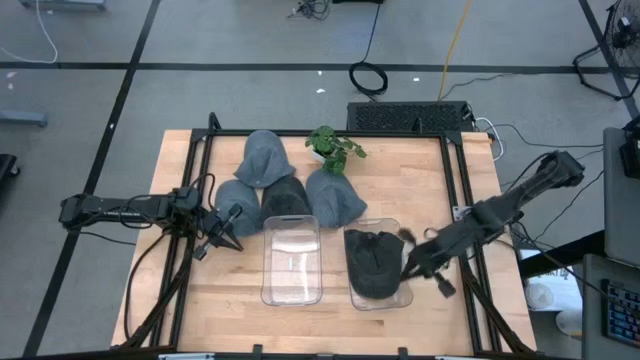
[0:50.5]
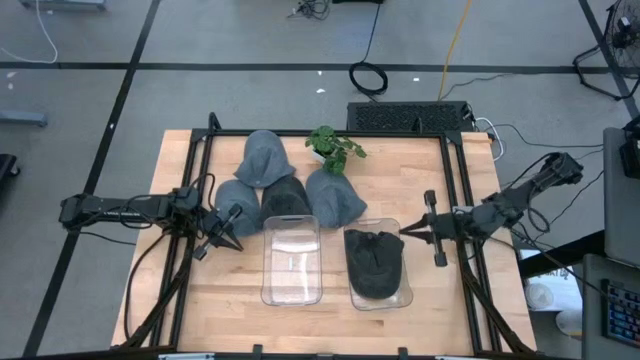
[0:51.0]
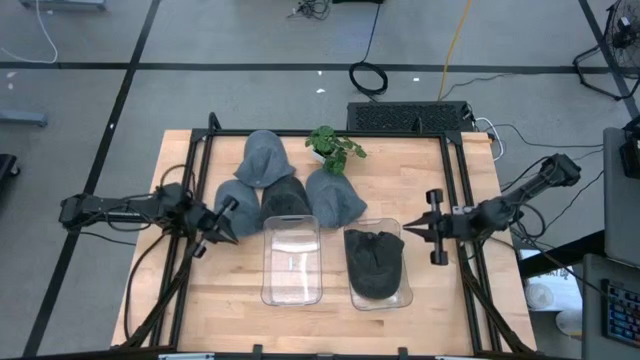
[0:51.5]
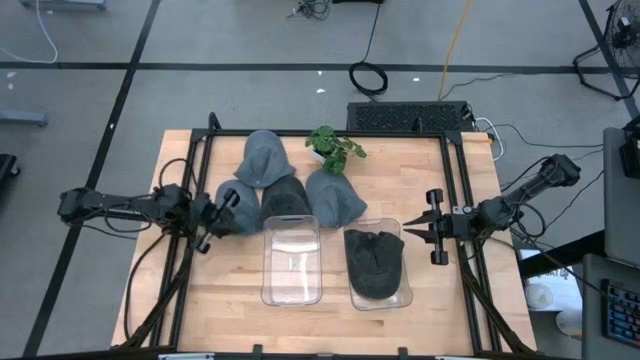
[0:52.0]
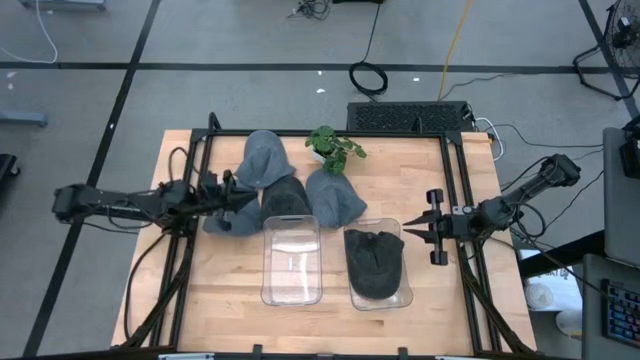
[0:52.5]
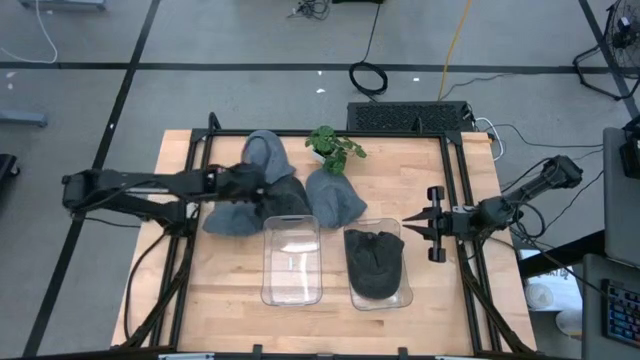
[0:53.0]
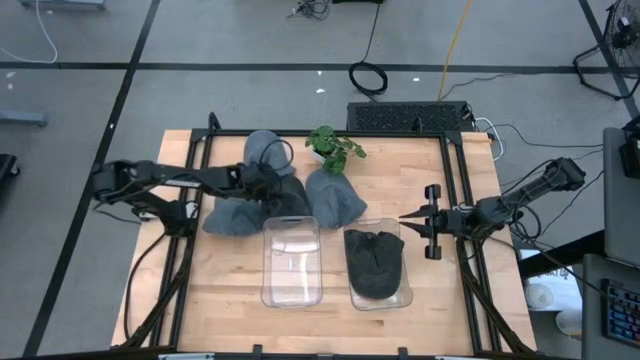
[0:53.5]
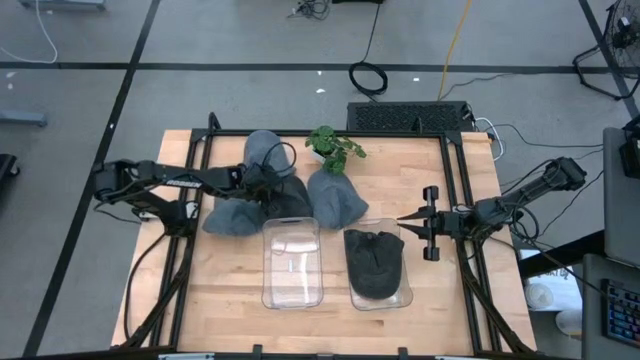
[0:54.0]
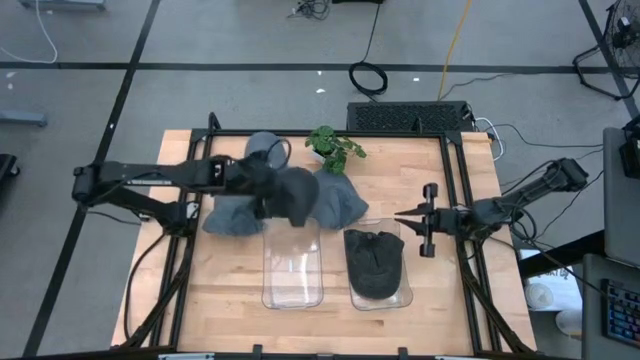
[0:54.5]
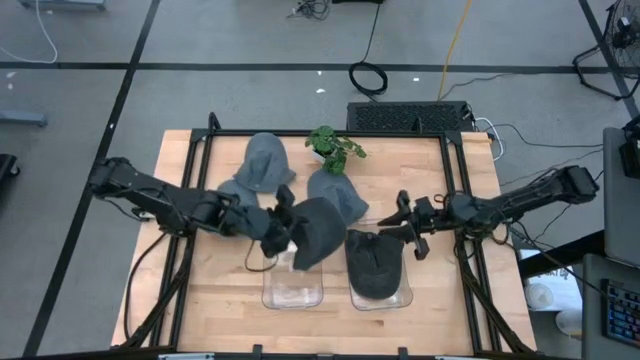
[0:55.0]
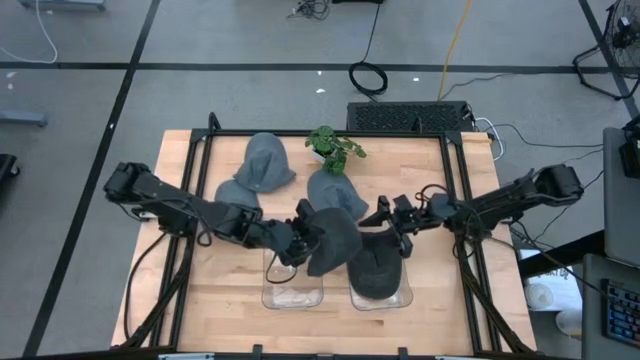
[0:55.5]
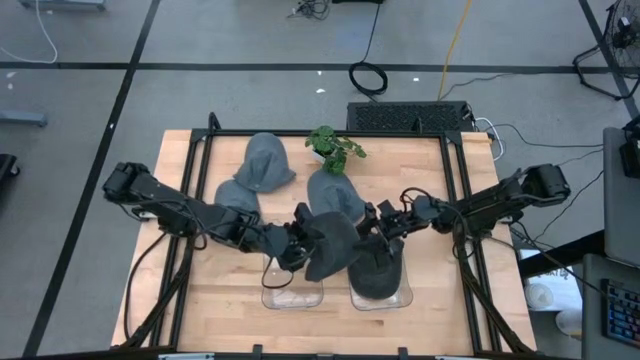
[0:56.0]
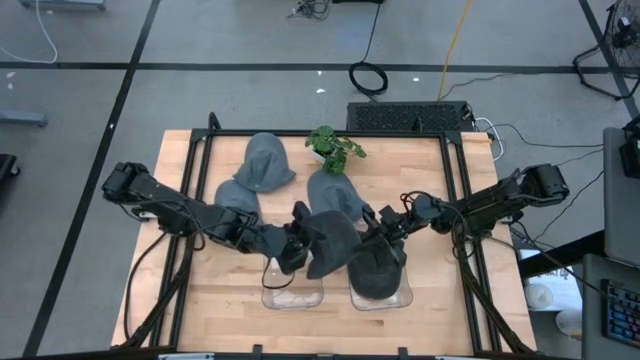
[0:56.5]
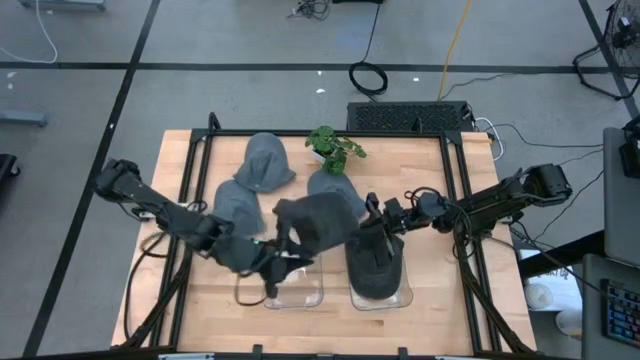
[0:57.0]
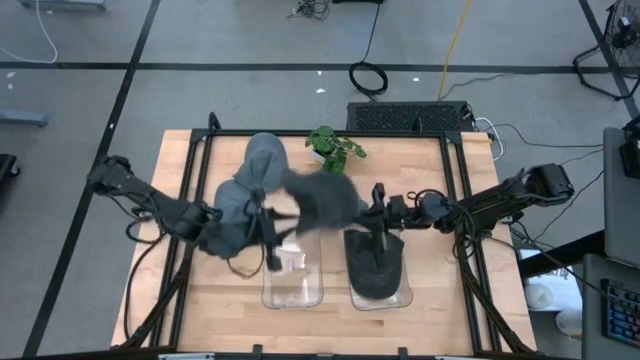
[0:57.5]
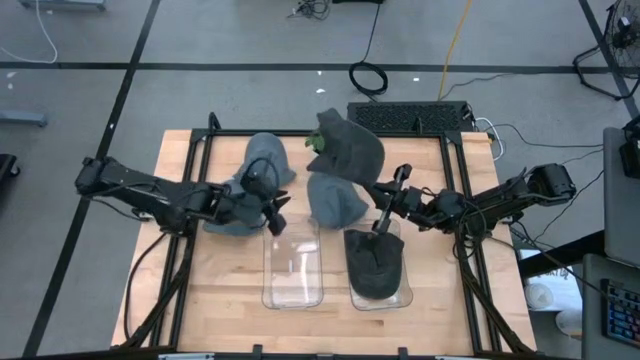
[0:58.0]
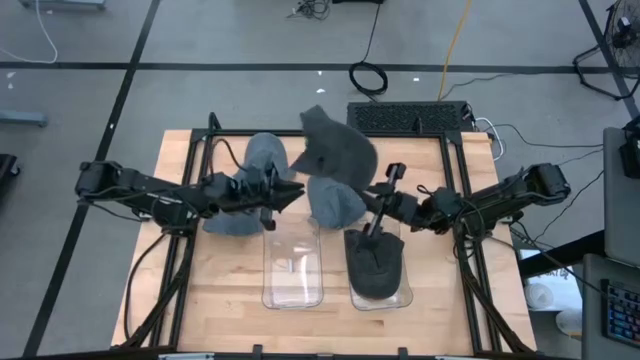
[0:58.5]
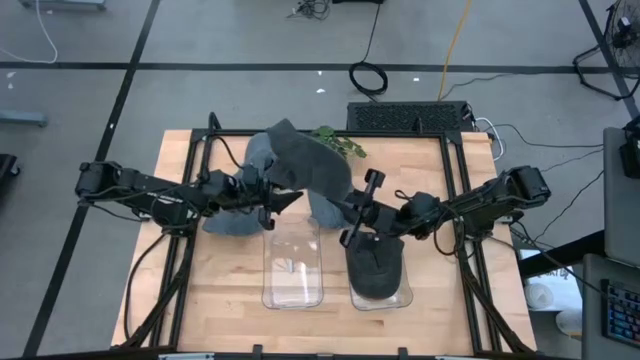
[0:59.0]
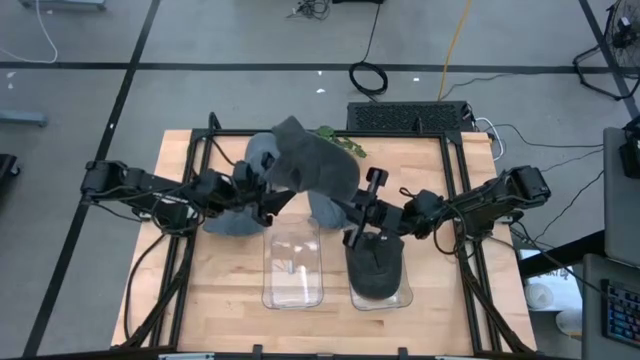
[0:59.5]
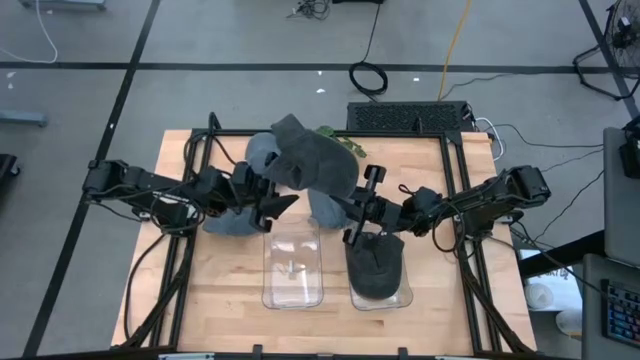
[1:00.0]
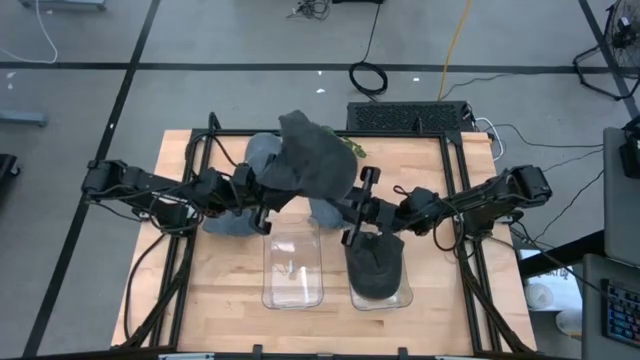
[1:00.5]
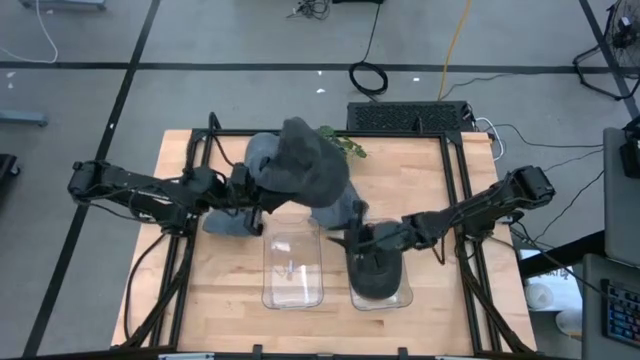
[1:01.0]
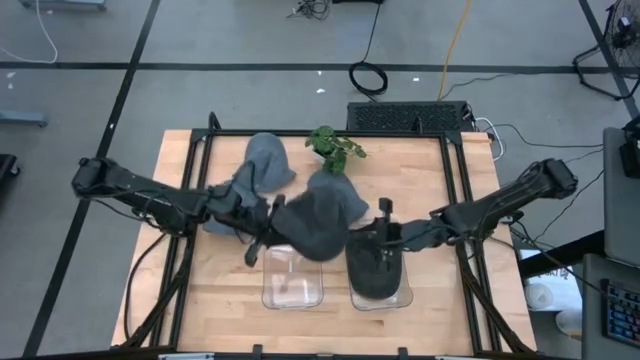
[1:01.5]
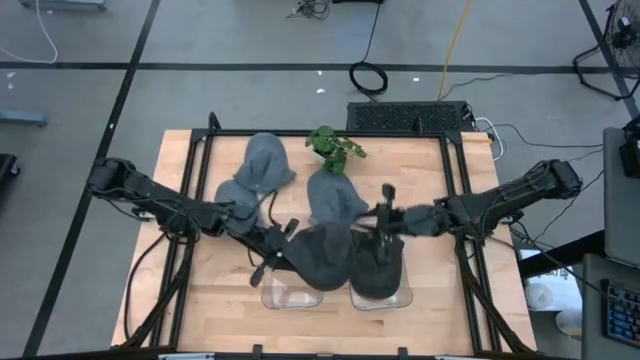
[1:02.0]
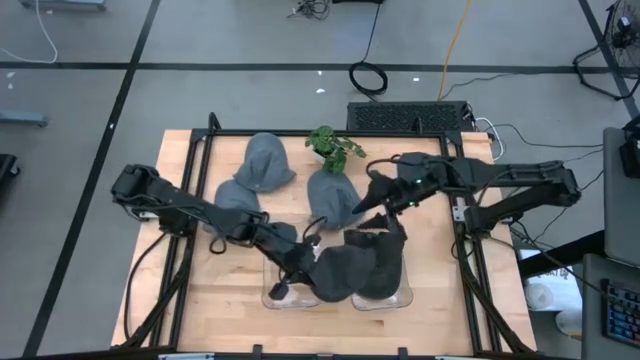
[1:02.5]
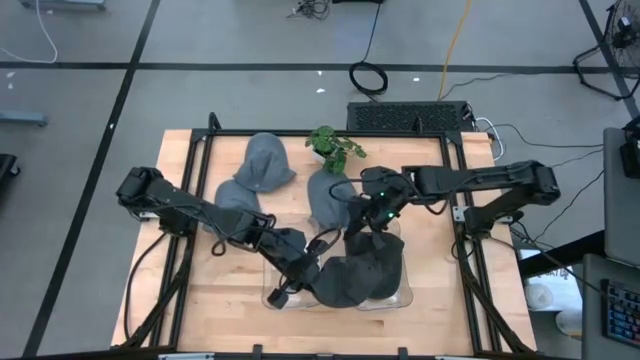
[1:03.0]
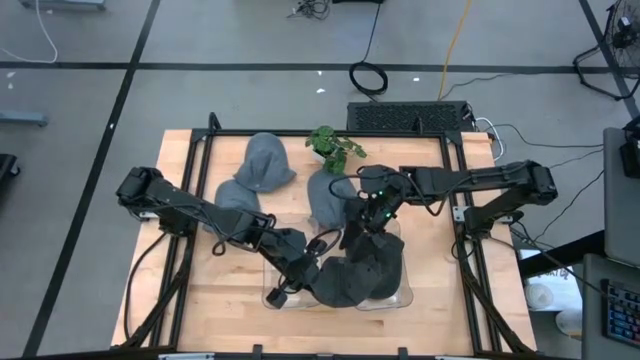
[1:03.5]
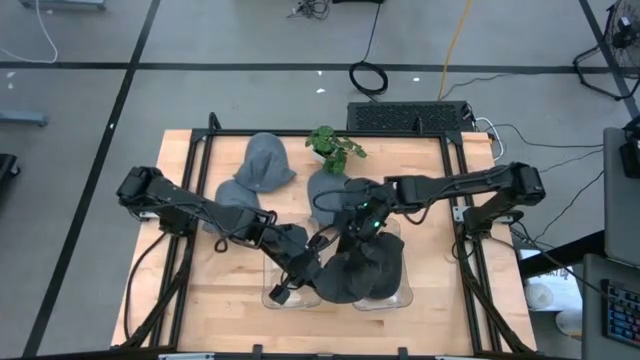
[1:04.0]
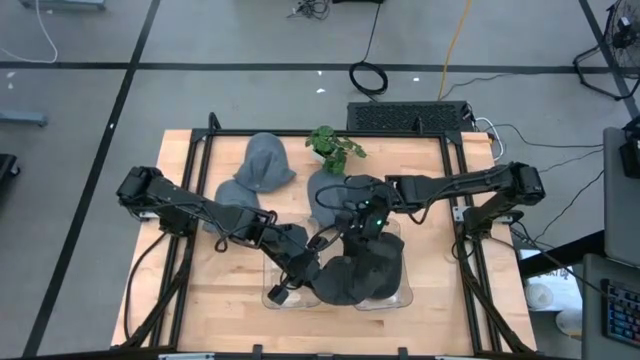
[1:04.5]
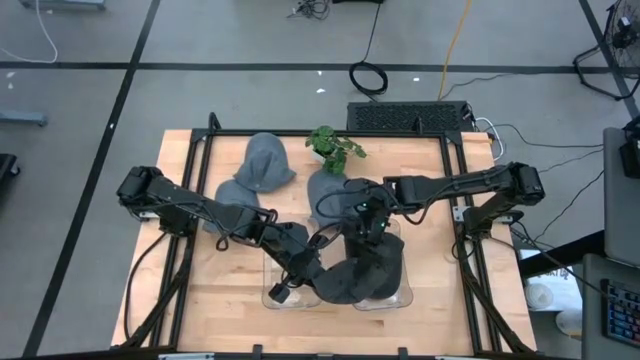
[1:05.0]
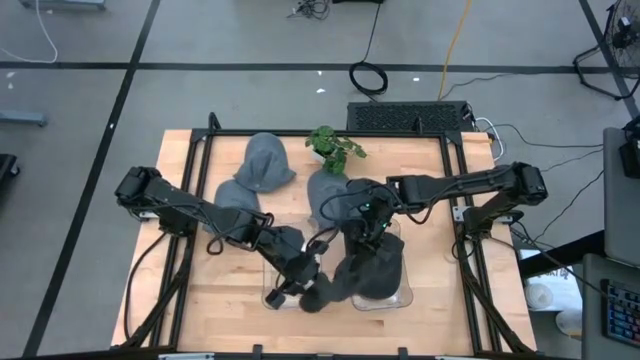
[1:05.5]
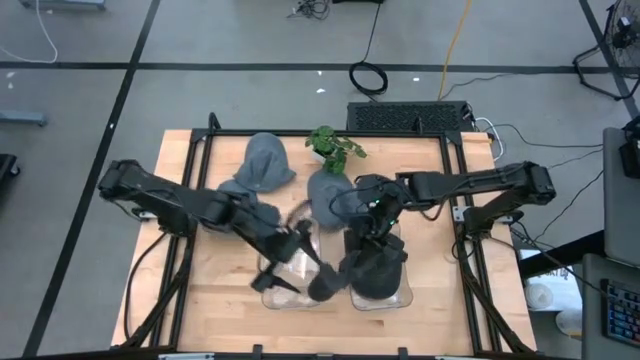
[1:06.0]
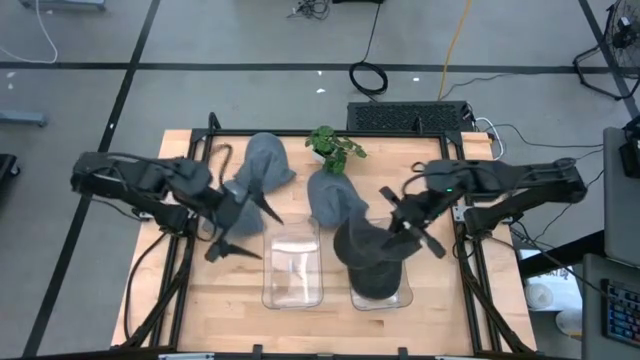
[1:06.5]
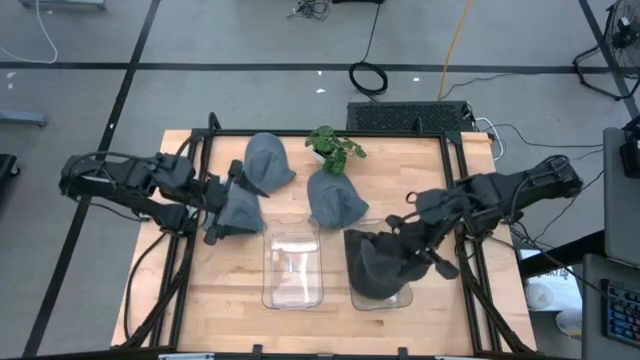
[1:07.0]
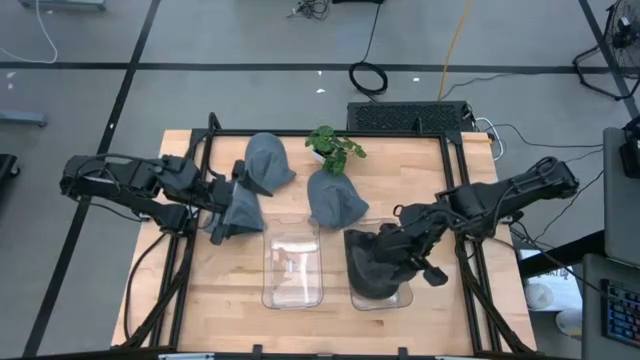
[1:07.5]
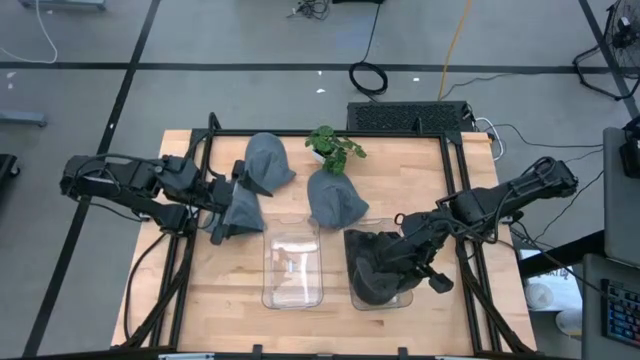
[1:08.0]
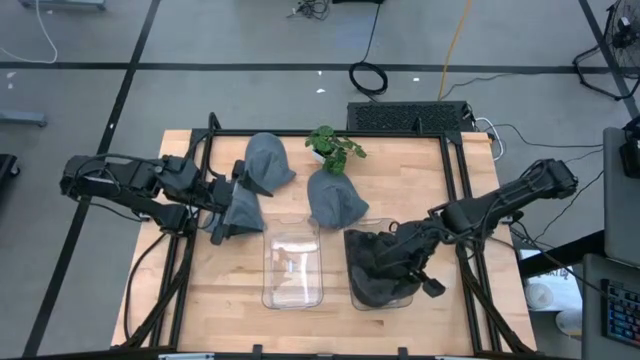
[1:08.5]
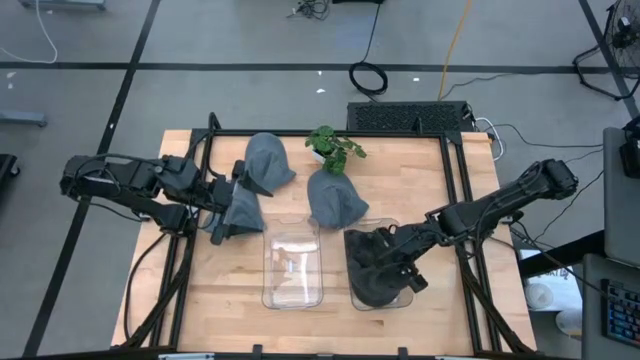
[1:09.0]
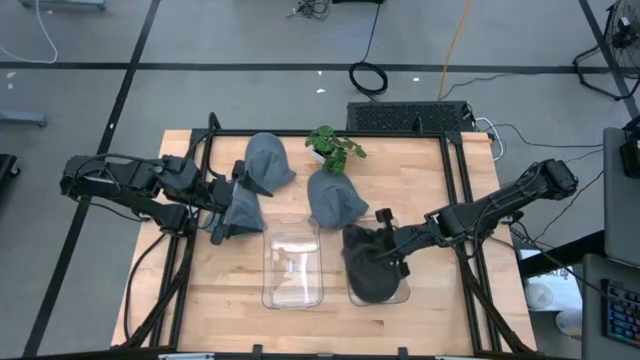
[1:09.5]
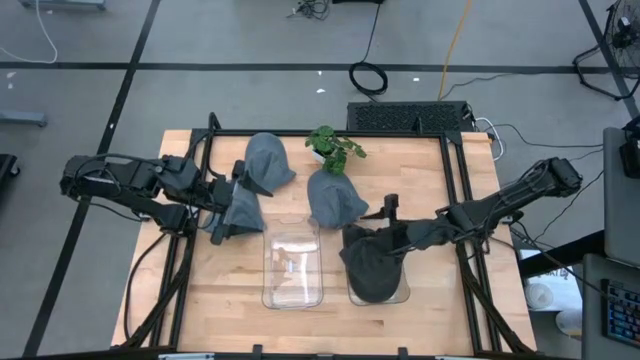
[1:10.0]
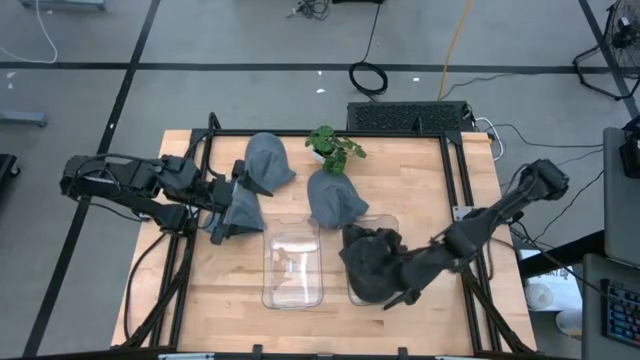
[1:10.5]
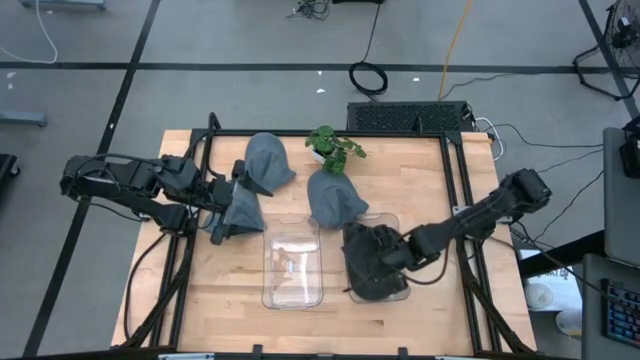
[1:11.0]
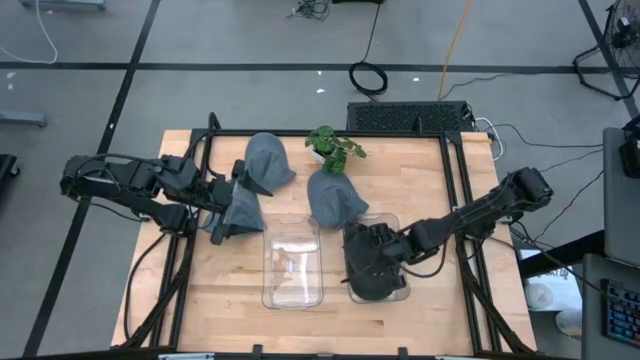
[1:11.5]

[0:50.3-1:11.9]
Task: Pick & Place hat
Put the black cap into the right transparent bin
